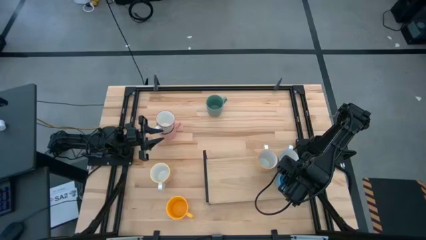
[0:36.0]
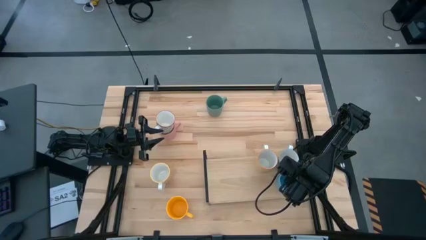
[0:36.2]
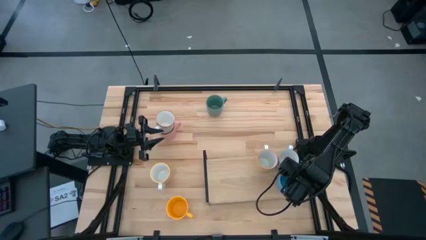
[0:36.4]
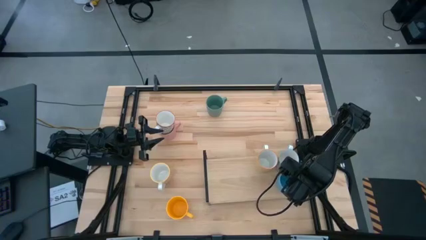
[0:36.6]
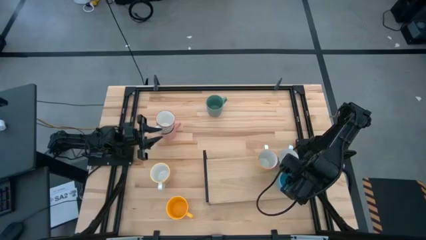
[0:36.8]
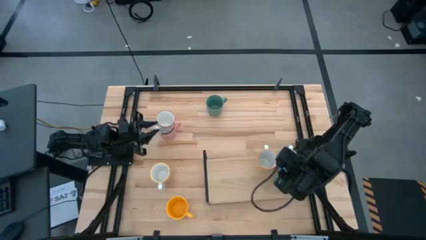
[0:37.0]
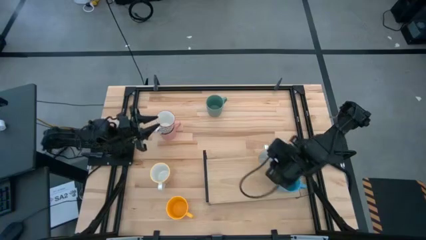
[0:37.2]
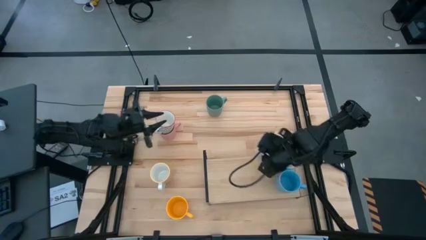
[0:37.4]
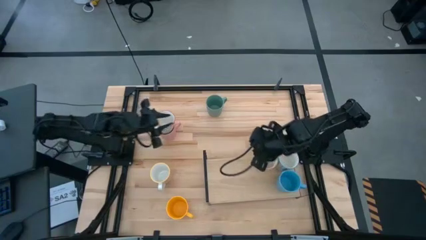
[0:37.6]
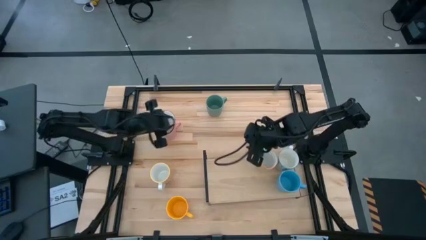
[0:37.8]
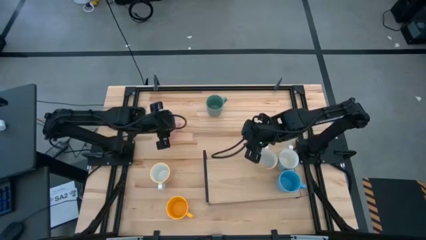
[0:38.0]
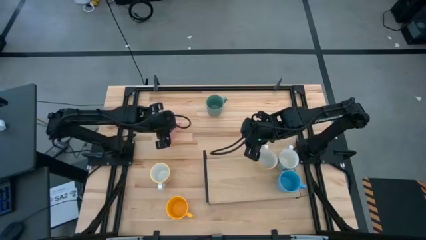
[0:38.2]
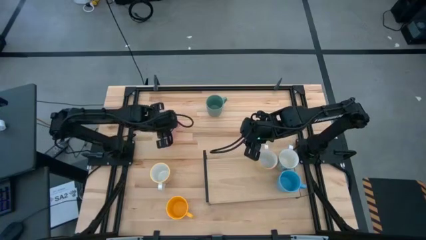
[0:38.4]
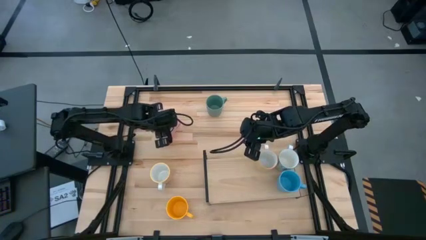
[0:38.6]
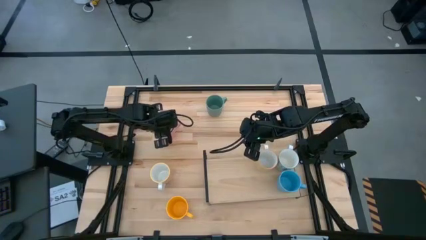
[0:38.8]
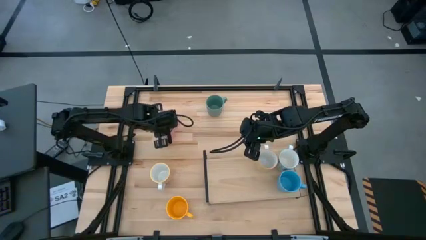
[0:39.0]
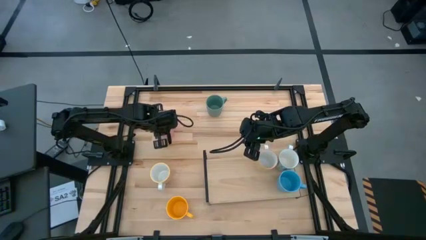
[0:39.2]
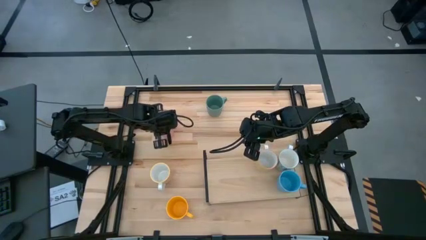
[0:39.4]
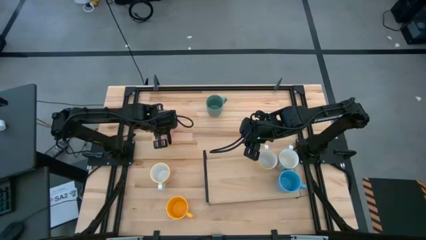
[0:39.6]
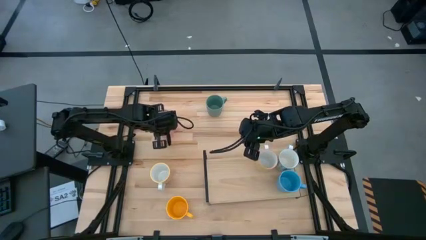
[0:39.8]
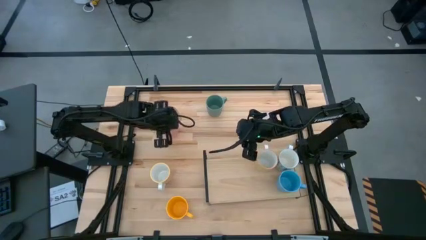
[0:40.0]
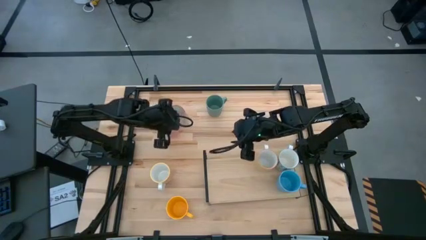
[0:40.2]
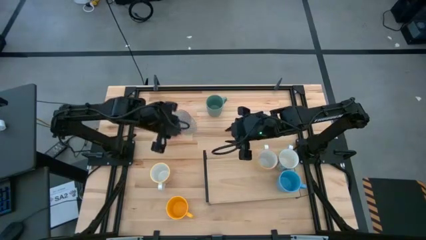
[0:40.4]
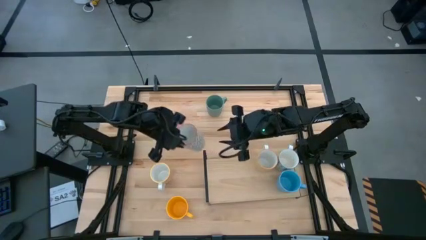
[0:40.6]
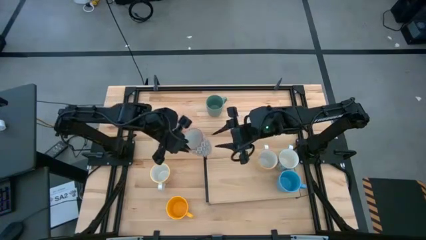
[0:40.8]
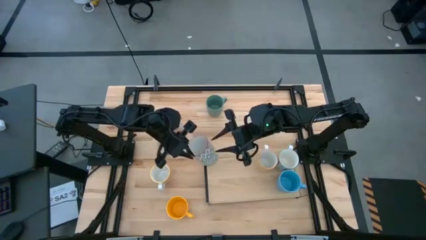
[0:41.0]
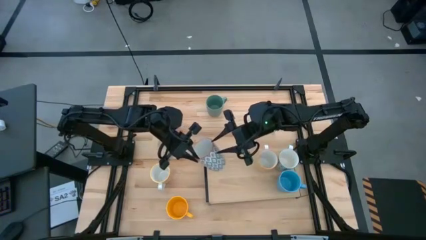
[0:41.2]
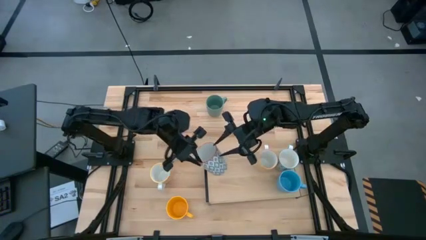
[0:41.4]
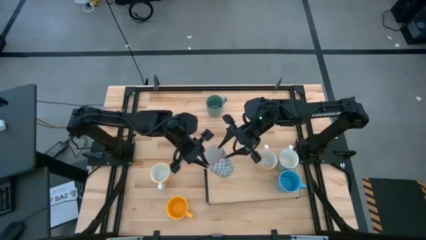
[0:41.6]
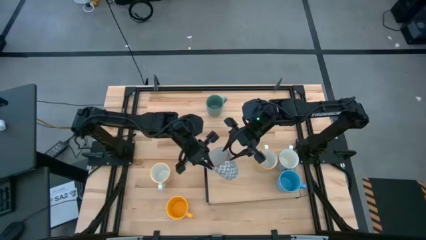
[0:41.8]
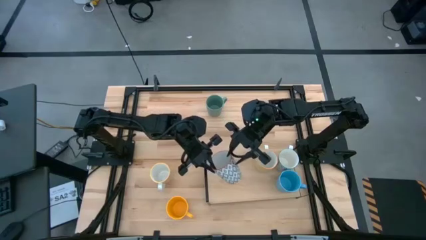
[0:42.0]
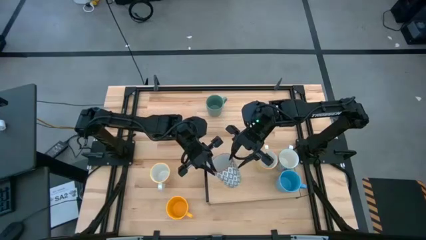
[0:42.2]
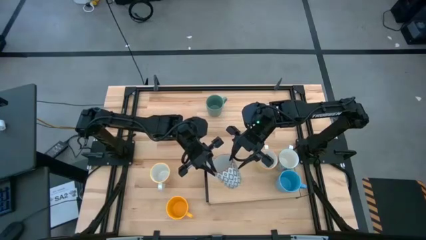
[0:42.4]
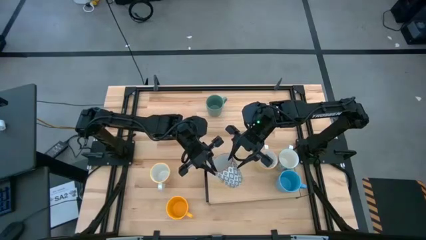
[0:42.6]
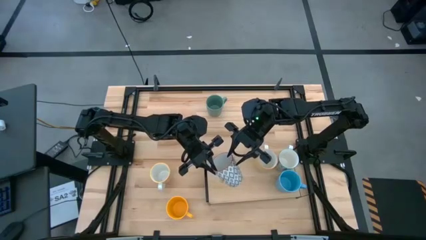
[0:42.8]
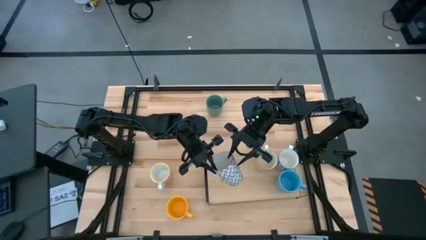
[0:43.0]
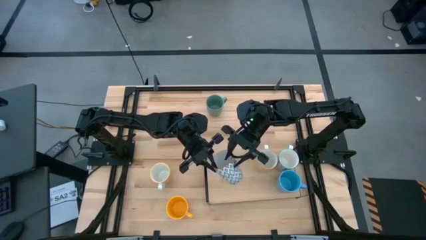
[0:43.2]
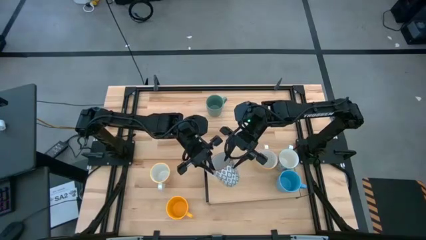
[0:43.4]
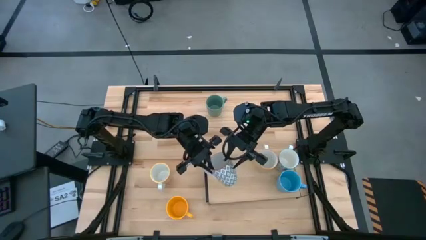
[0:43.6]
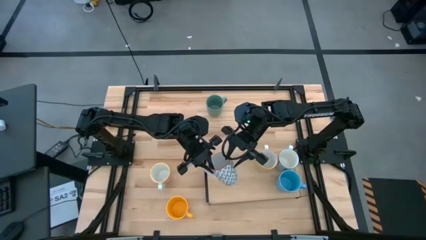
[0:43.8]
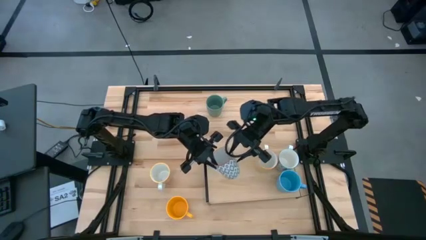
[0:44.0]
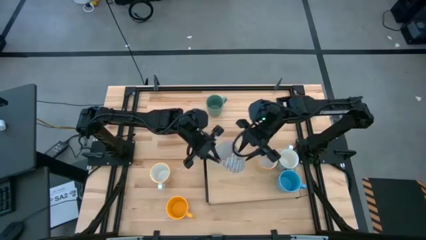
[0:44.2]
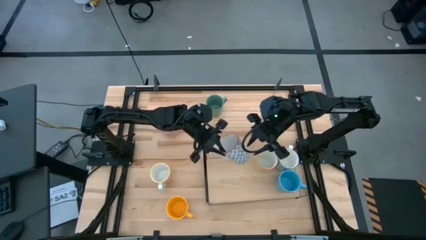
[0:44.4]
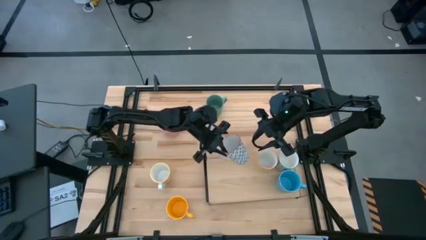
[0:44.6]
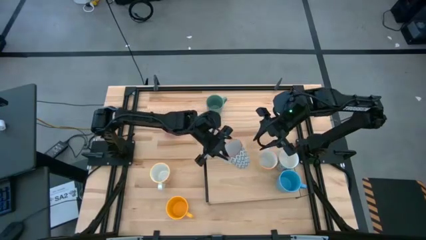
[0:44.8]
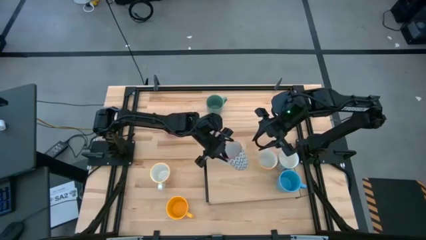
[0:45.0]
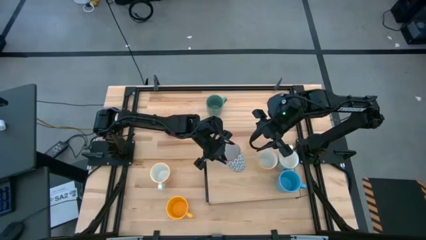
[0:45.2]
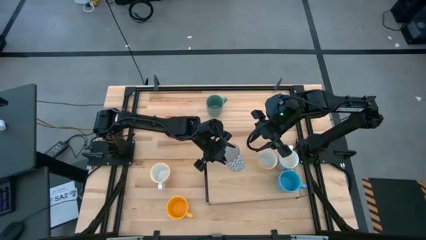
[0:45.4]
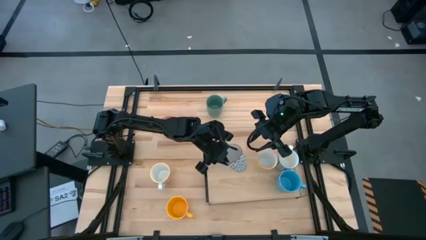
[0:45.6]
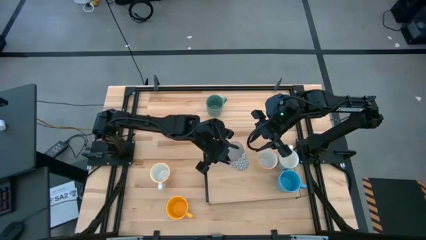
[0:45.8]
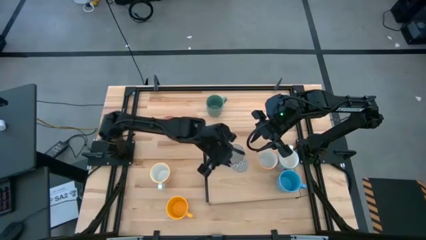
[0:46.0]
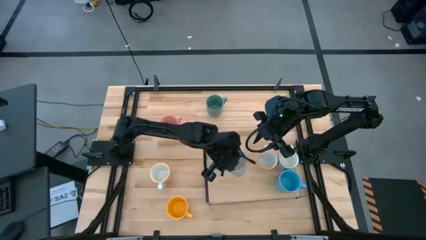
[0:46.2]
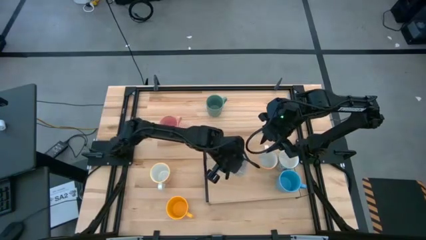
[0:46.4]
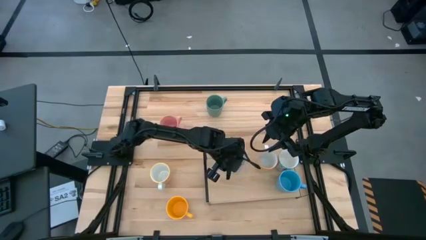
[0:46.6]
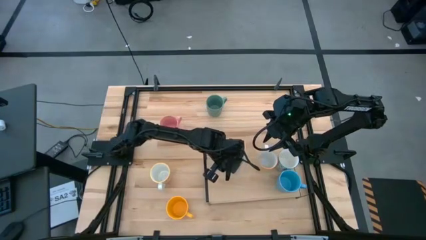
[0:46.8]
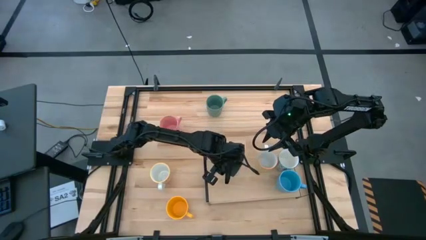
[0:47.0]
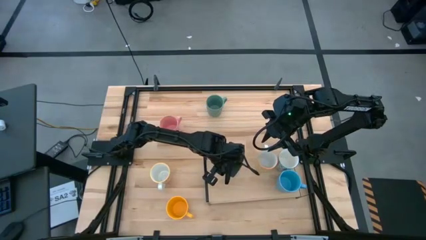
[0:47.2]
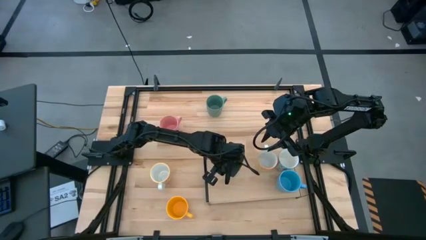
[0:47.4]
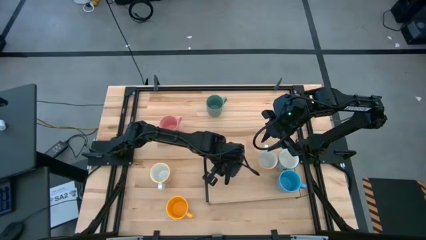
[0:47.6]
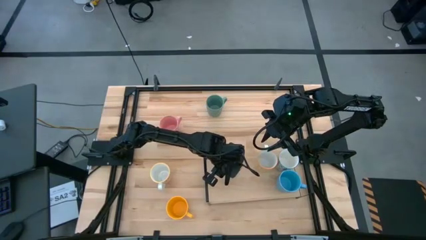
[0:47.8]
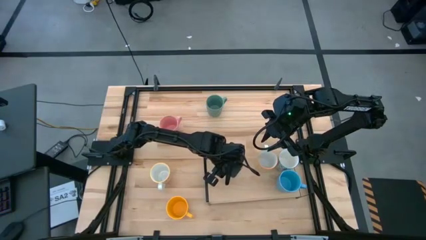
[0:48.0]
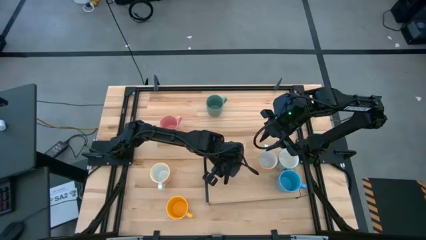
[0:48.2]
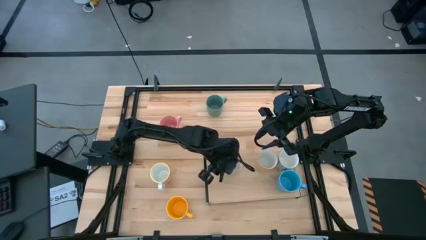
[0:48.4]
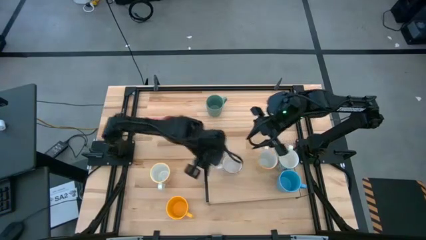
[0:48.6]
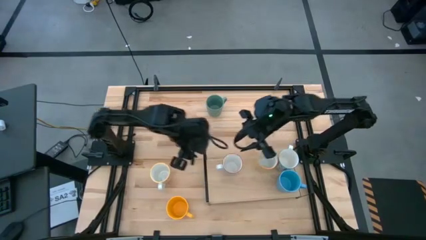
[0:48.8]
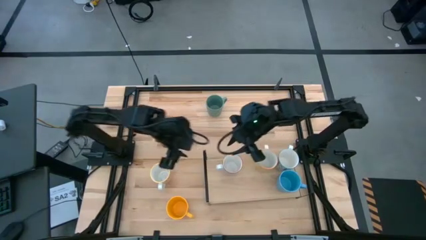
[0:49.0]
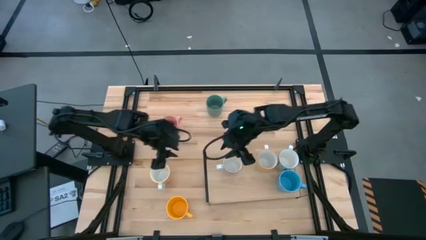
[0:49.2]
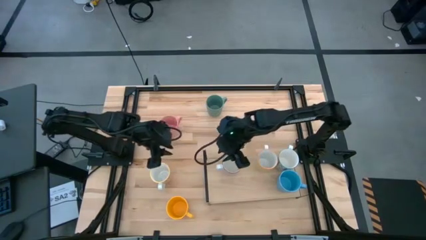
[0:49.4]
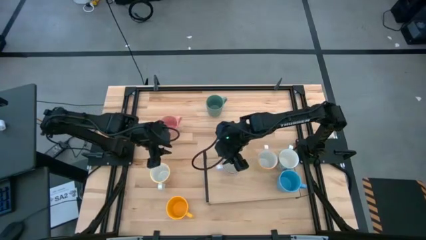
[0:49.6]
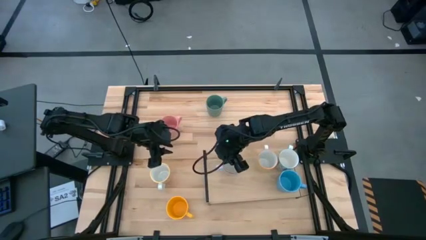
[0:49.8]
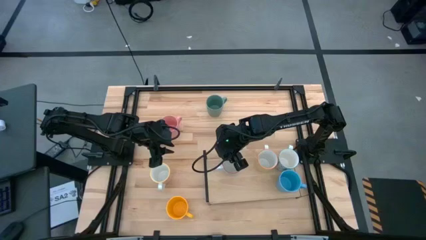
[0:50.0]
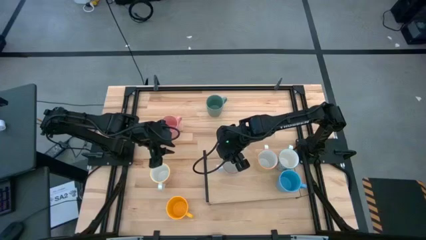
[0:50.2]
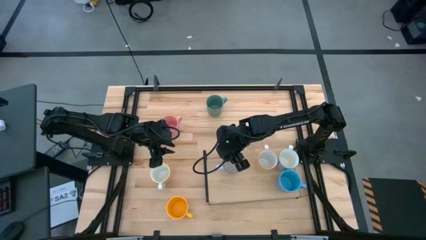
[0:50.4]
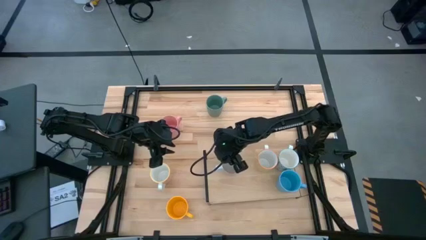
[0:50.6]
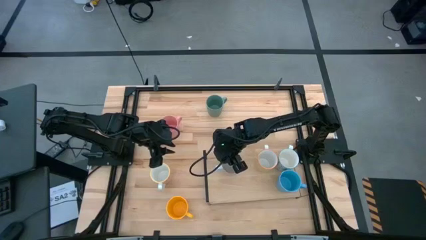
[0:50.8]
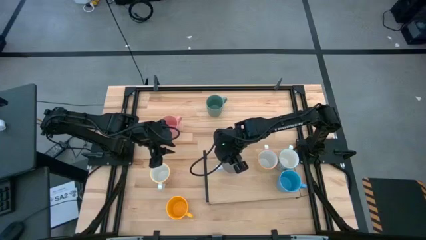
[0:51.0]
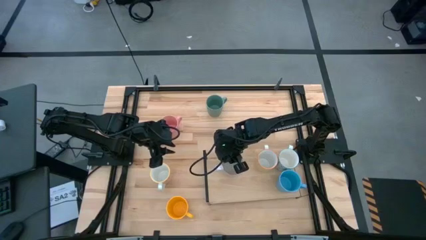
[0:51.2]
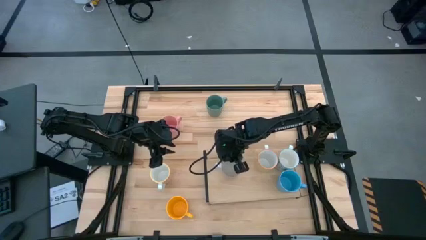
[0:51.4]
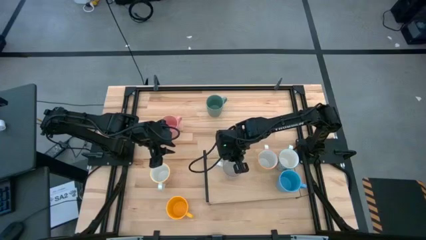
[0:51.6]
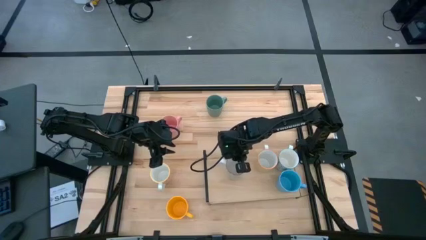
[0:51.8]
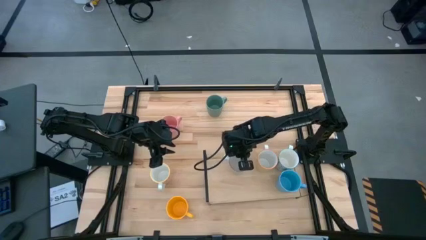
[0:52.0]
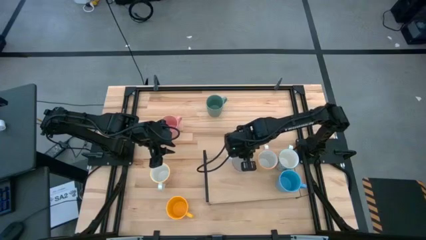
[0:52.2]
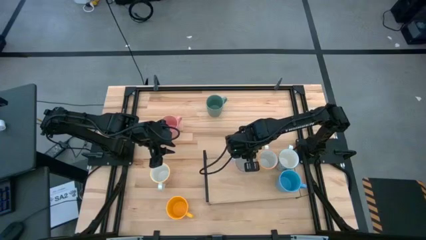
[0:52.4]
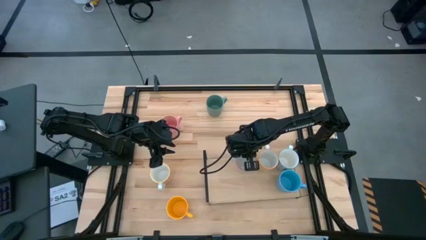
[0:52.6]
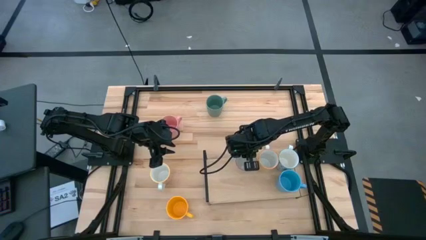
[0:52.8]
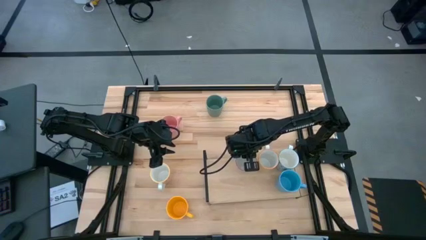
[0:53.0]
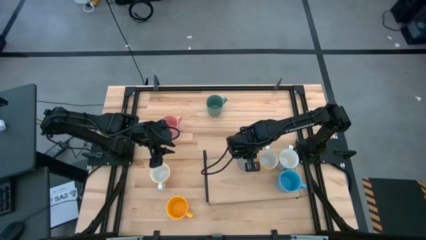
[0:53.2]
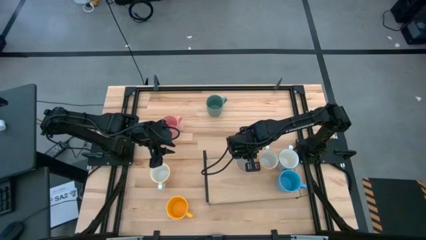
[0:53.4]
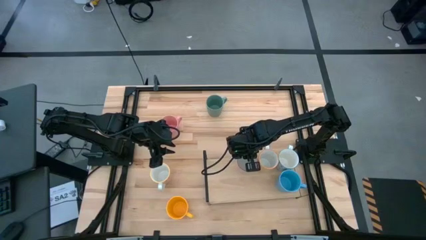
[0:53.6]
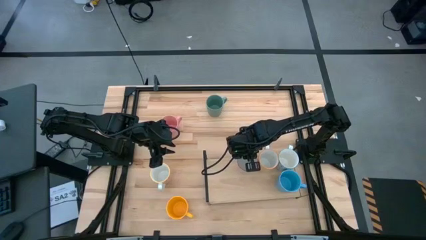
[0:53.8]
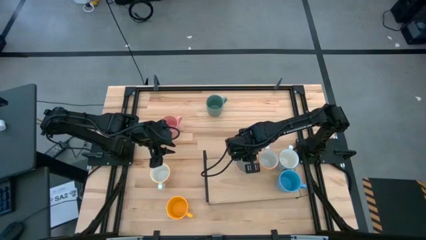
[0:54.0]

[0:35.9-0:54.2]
Task: Place coffee mugs
Put the gray patterned mug on the shelf
